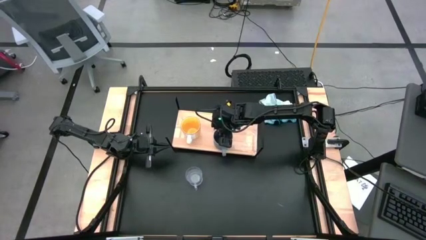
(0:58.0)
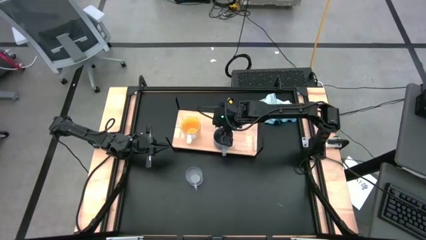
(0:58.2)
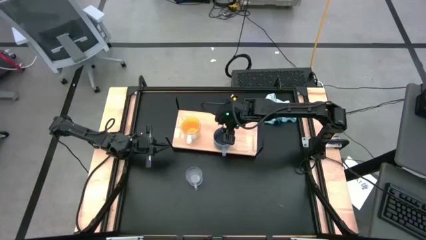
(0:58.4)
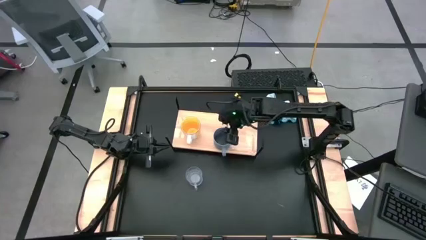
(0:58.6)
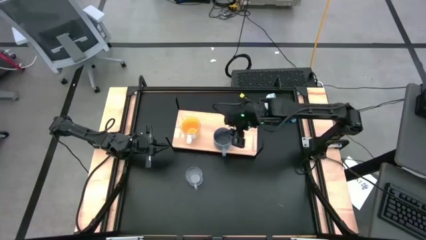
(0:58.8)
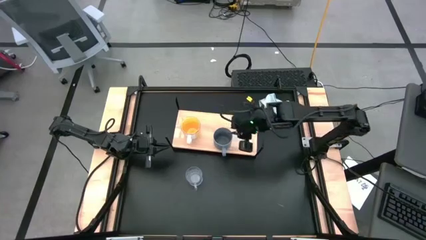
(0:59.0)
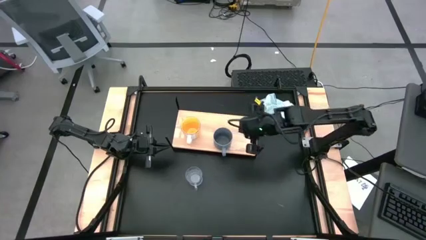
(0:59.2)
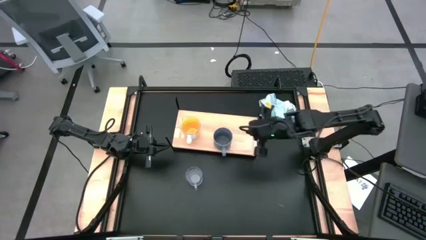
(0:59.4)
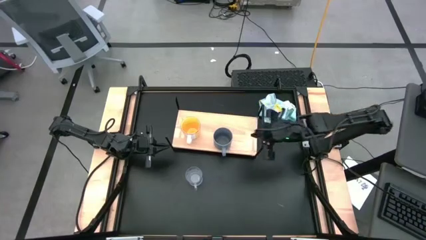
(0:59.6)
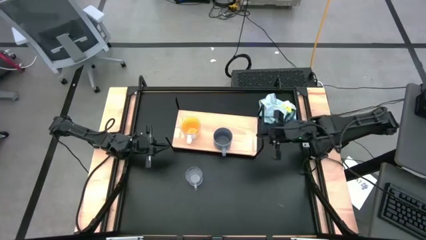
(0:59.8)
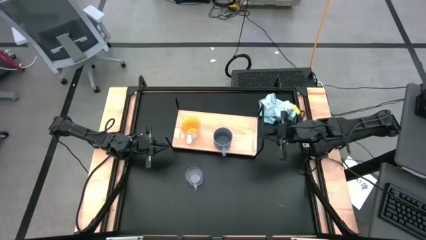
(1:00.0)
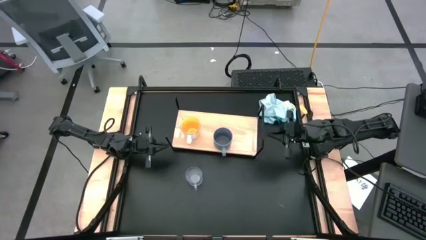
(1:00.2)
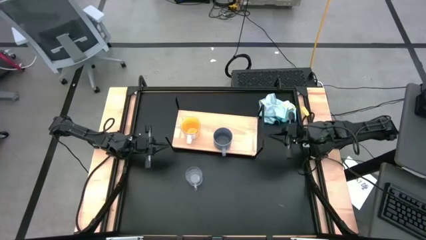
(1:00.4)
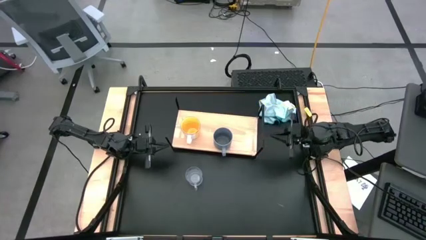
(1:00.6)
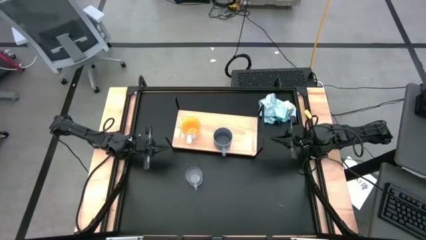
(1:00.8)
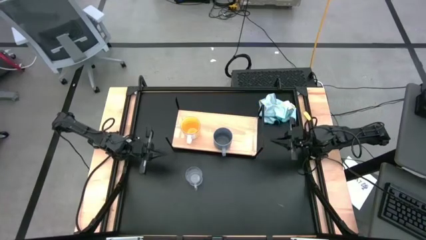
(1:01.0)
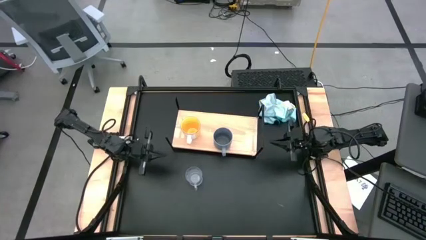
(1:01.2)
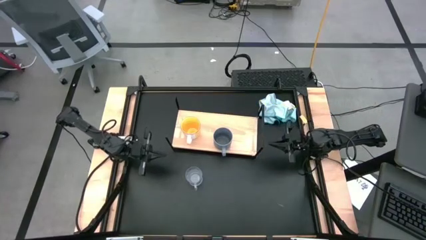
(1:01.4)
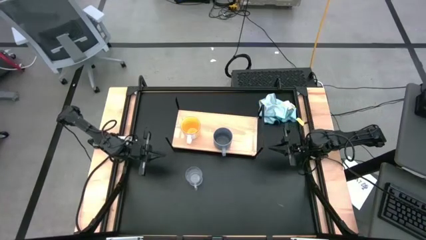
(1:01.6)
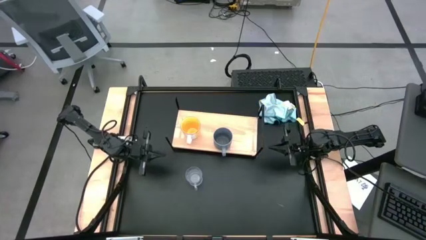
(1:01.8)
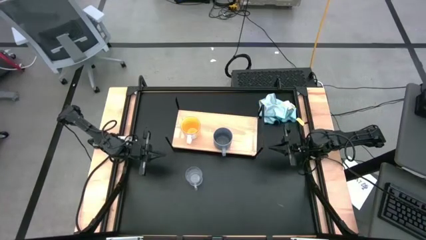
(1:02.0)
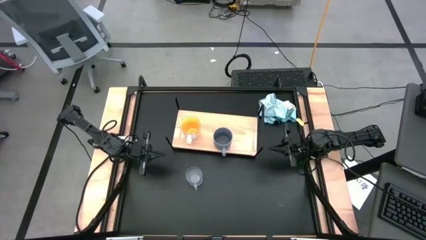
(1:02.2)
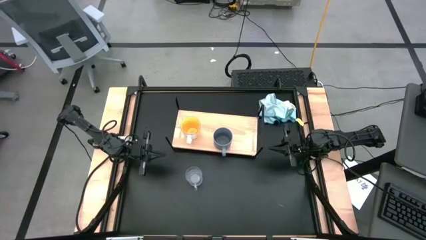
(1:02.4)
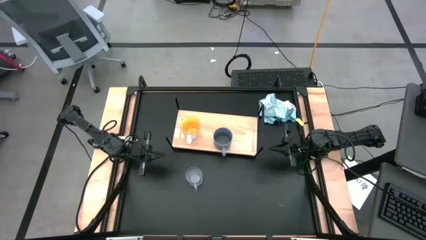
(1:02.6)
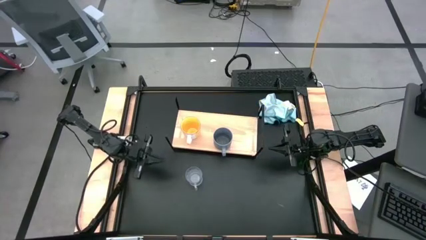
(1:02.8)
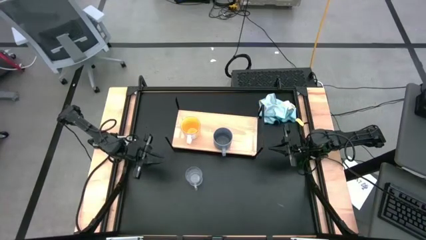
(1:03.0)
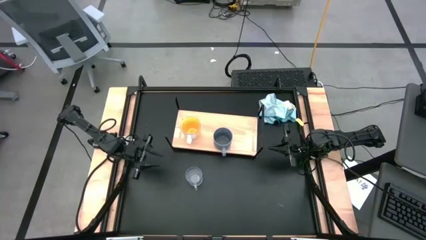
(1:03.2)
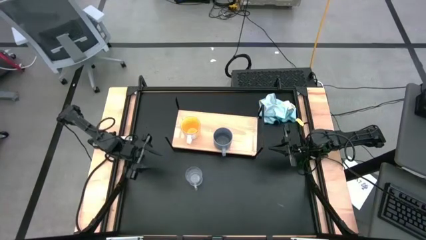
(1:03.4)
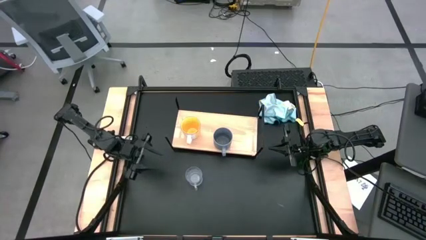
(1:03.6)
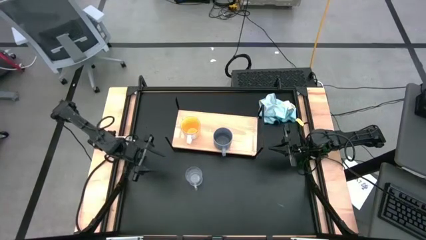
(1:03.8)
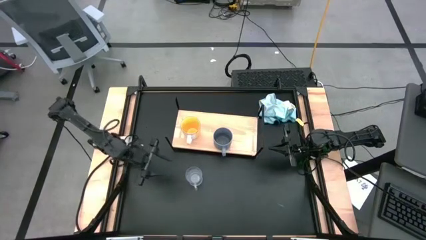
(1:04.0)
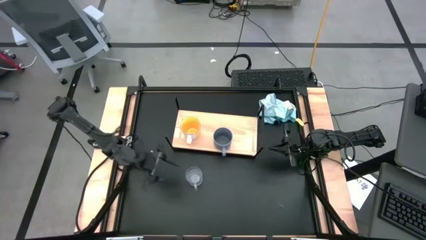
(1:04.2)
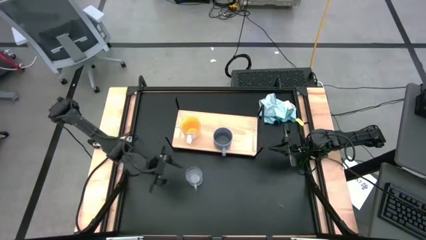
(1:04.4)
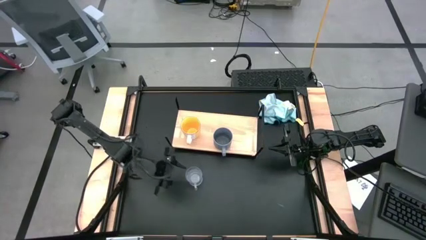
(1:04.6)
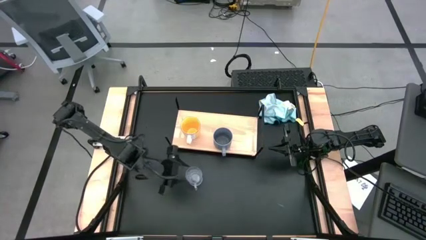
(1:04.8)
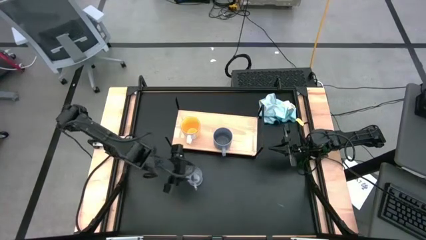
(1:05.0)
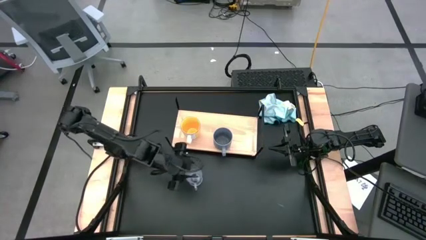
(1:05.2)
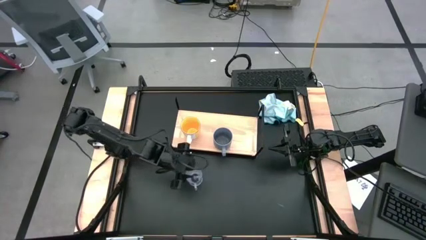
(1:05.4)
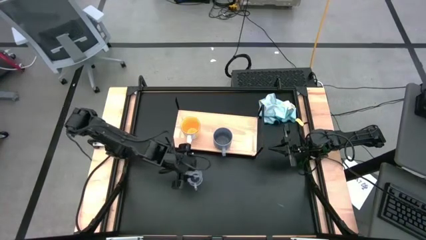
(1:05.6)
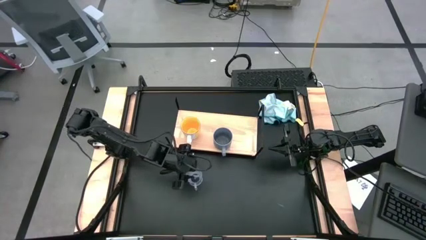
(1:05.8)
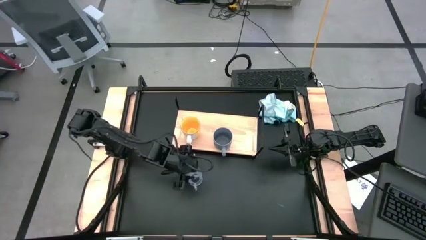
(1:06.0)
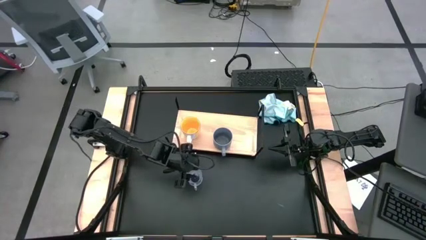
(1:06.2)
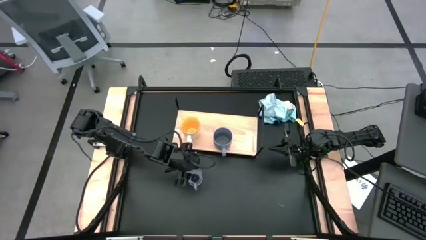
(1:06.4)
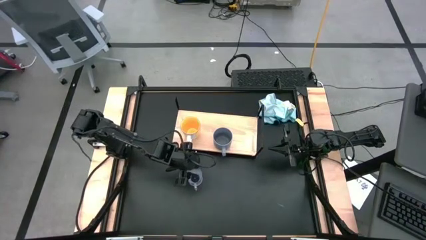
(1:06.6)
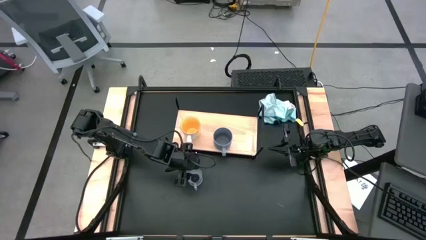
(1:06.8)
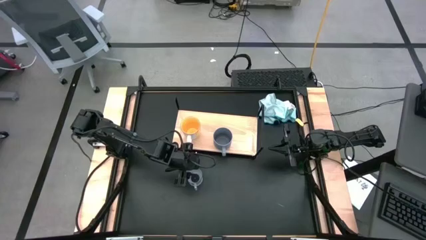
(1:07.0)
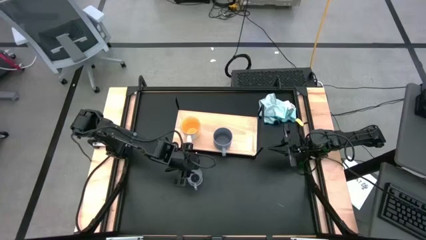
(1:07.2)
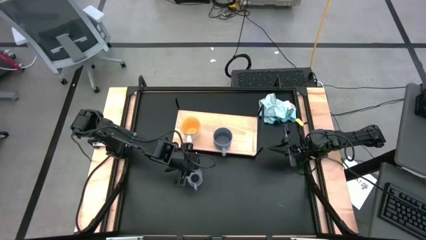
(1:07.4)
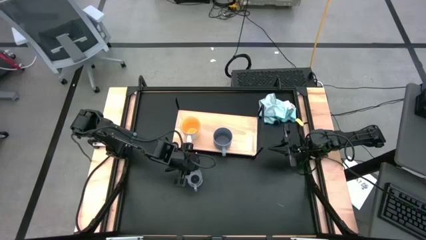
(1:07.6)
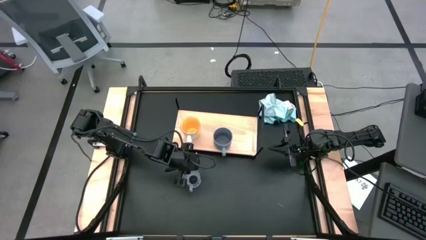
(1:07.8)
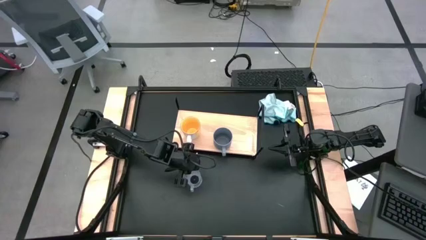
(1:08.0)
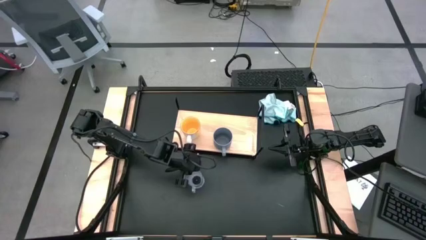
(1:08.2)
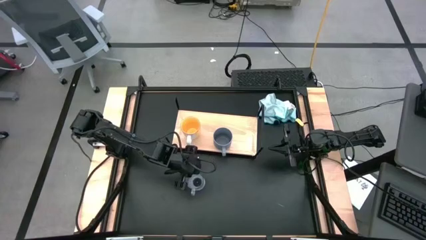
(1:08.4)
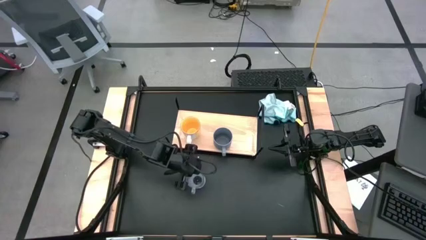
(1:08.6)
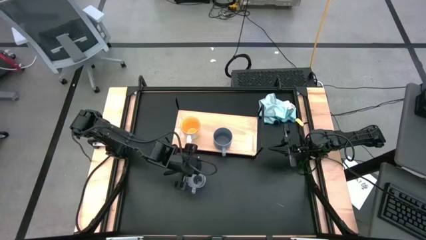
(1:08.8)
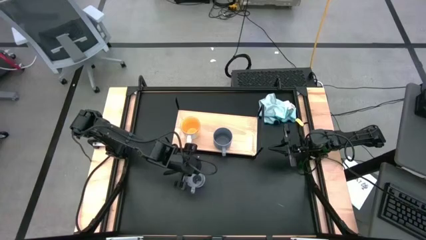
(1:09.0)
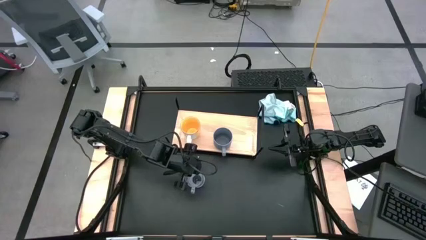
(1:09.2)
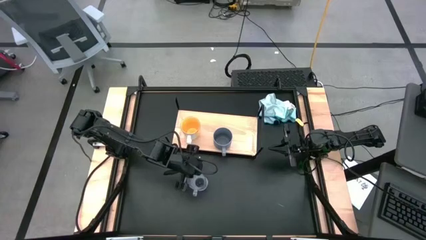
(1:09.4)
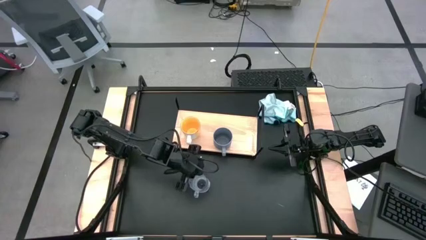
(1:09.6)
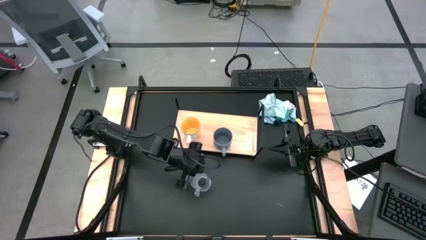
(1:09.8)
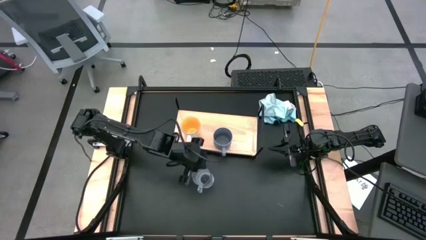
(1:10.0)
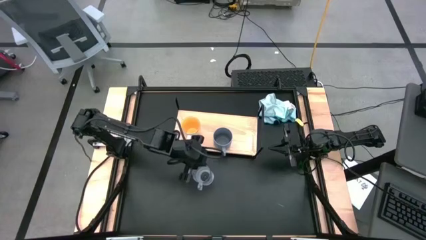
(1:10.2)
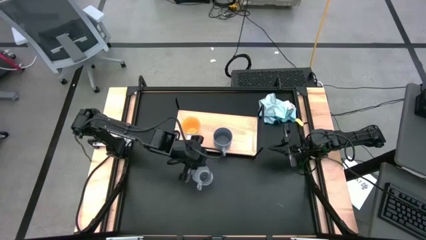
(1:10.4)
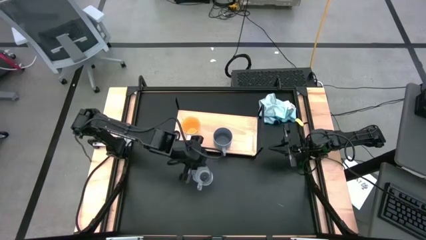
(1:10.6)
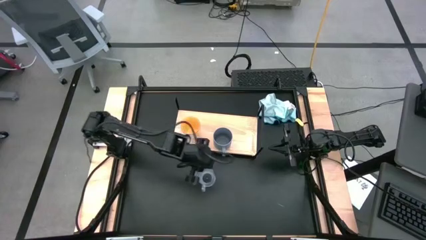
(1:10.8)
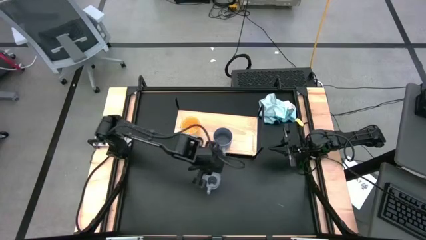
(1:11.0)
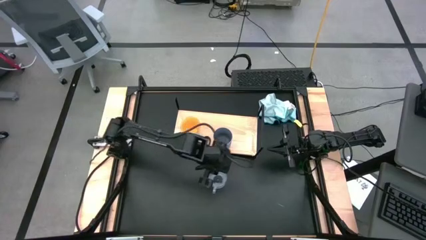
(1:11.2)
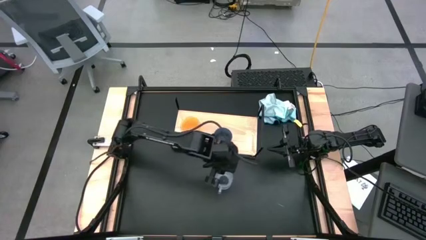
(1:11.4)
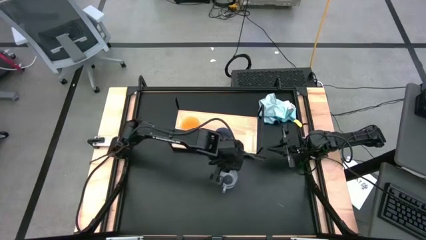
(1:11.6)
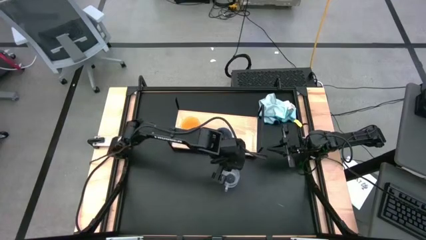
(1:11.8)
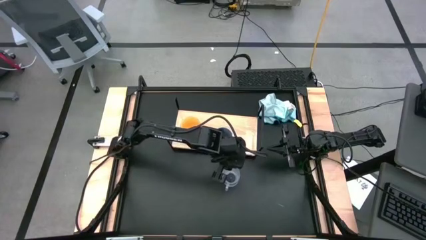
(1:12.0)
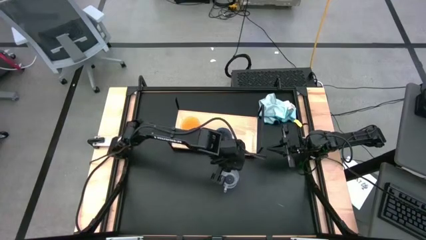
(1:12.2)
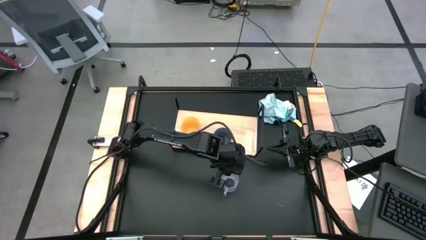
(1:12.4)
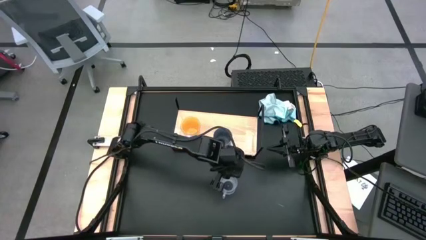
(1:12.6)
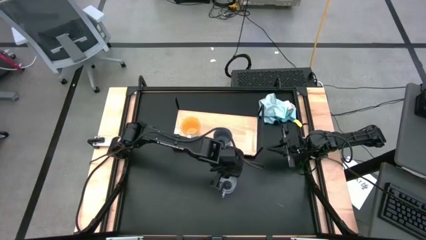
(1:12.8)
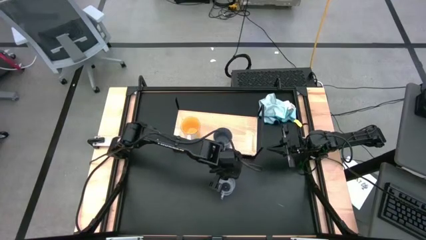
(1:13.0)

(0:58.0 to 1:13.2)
Task: Stack small to large cups/mugs on shelf
Put the transparent mug on the shelf
